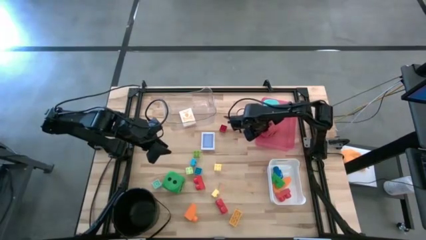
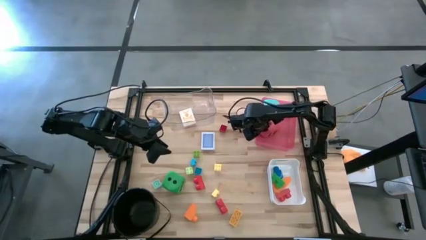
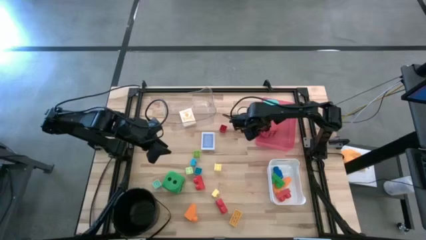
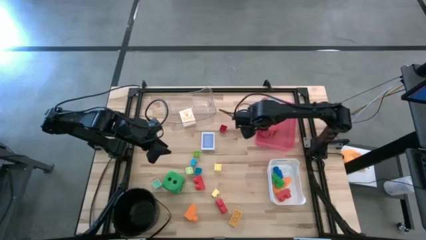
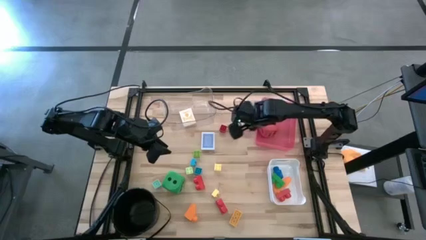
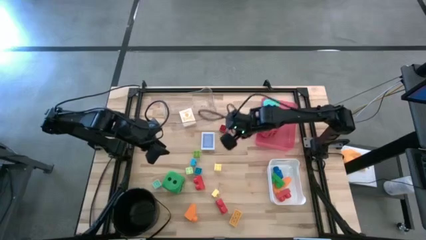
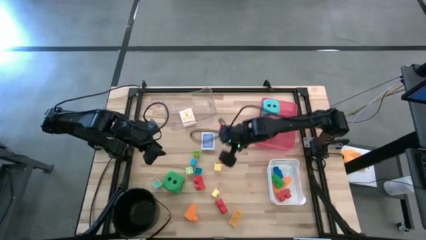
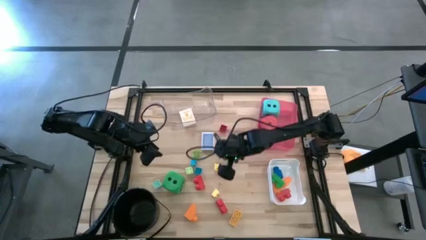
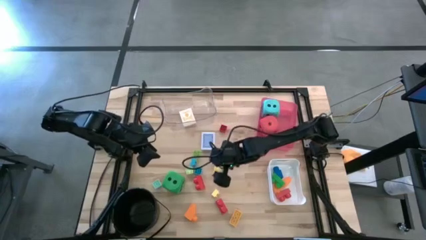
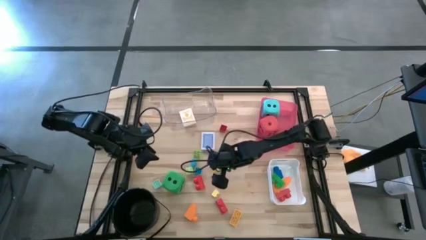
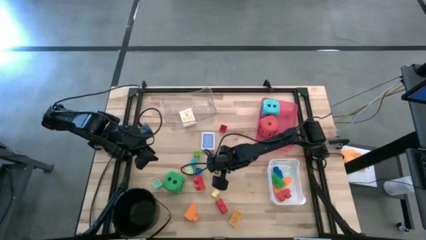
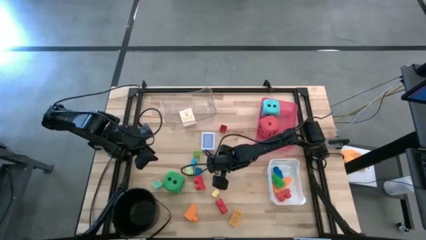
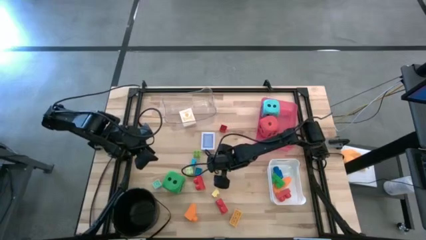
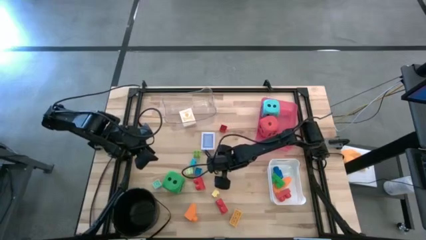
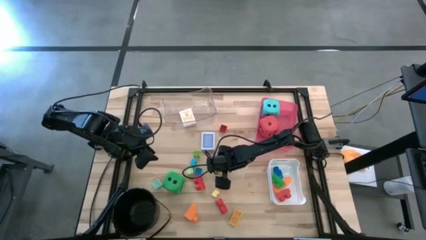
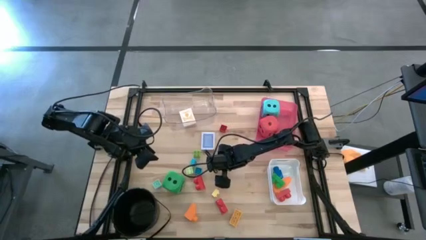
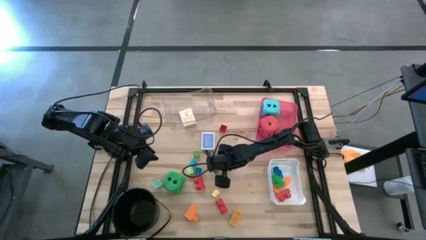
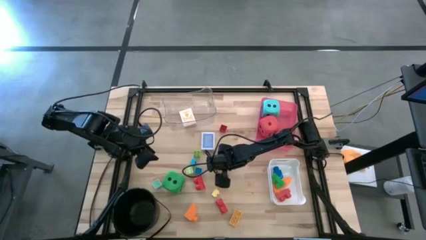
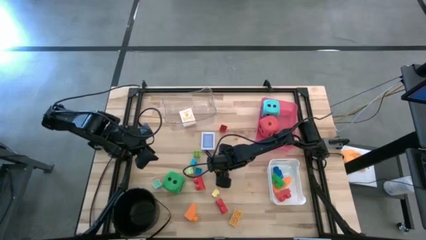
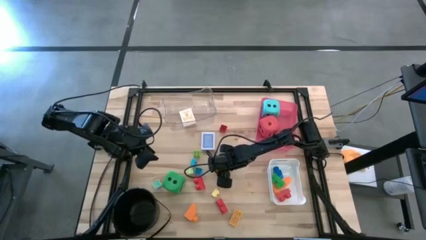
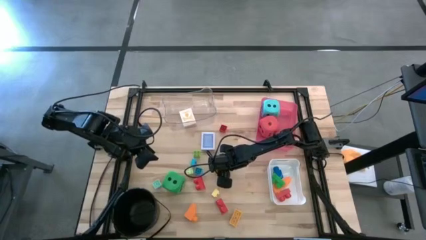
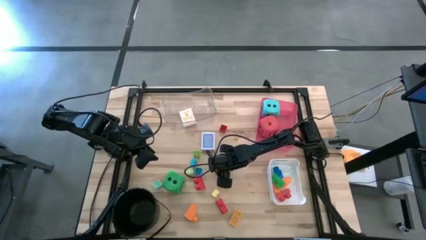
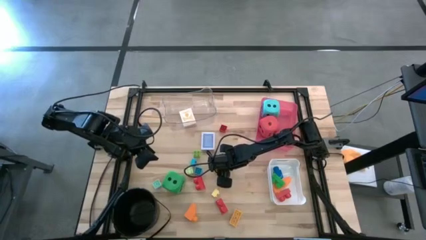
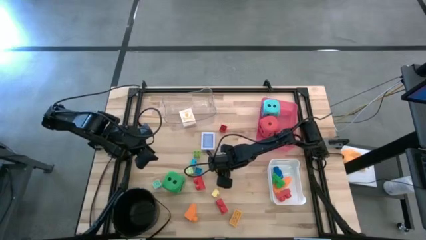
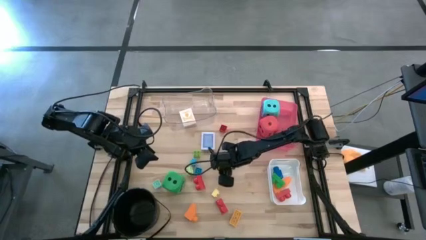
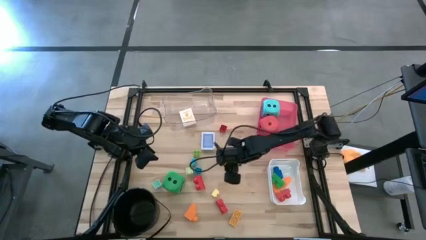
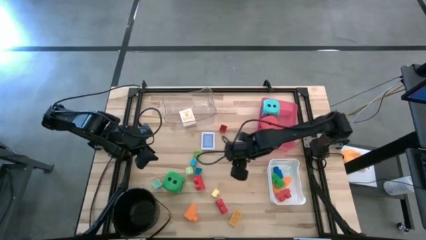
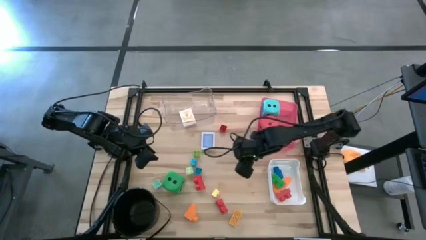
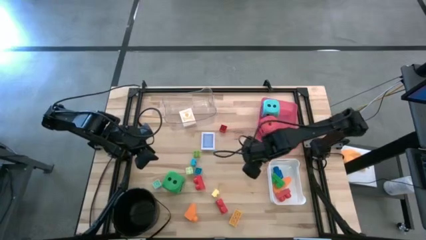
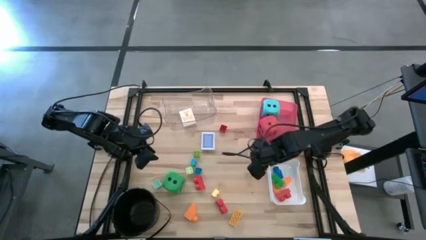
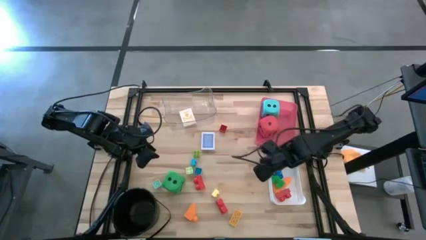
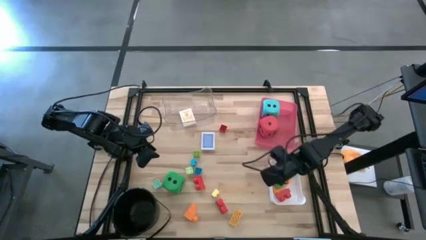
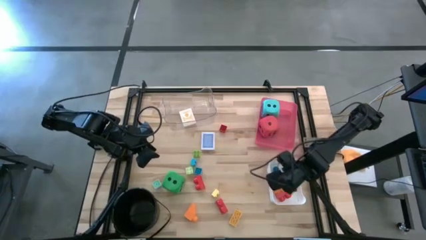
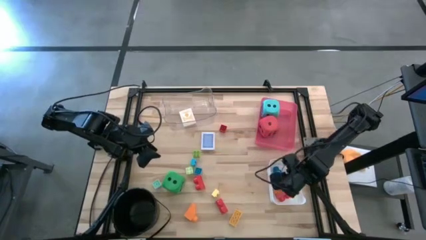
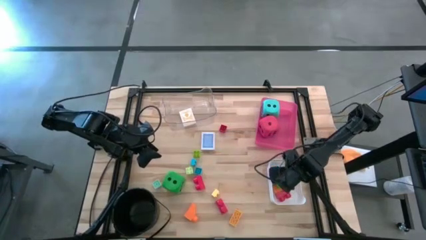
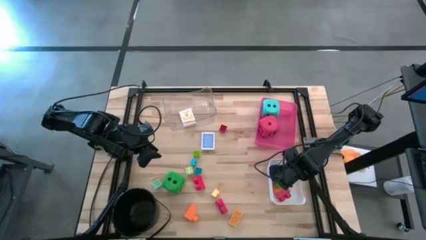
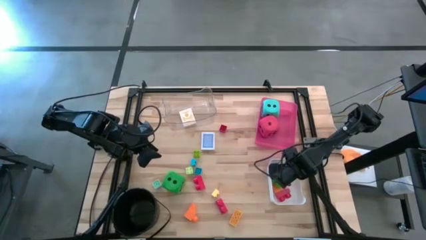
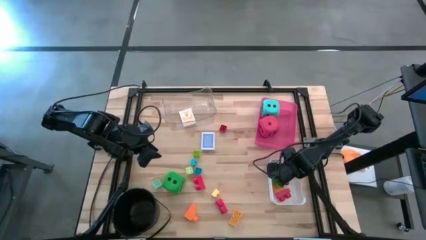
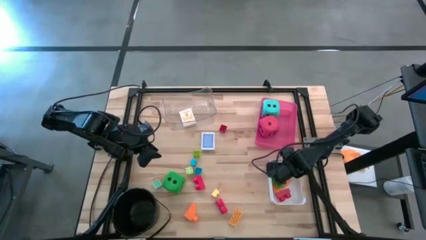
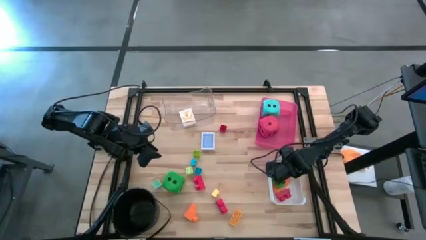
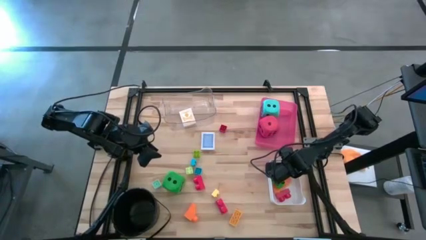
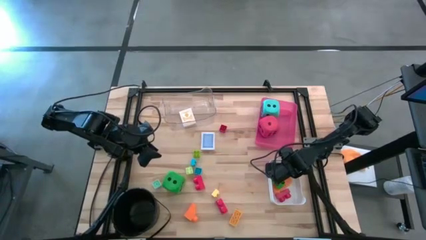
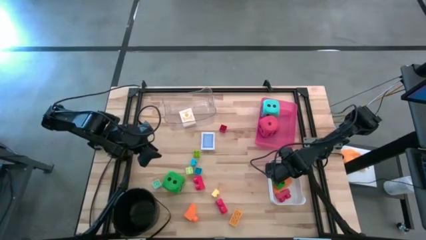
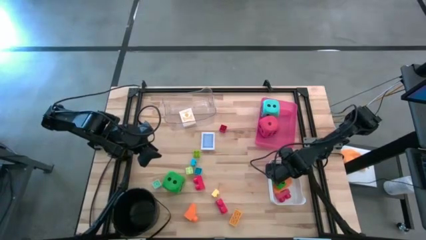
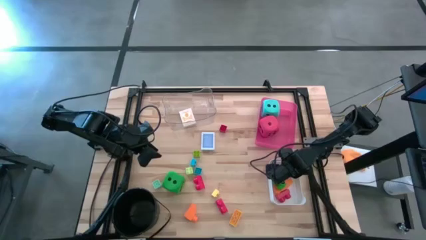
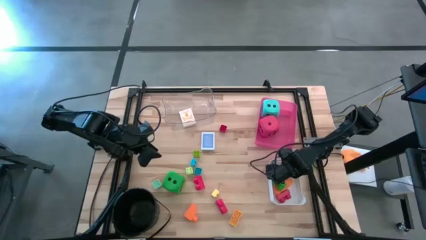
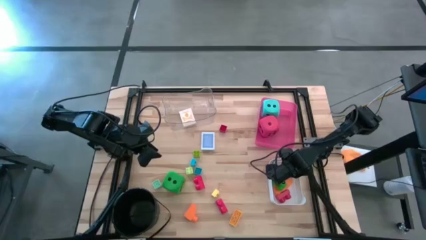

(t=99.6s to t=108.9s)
Task: Pick & Place Toys
Put the yellow game piece into the white bin

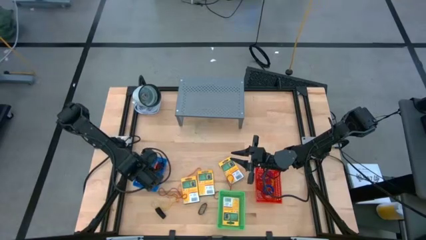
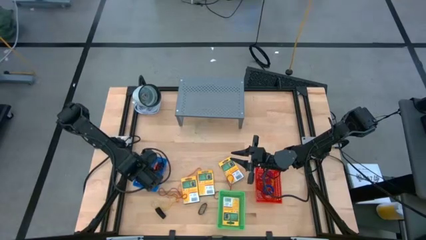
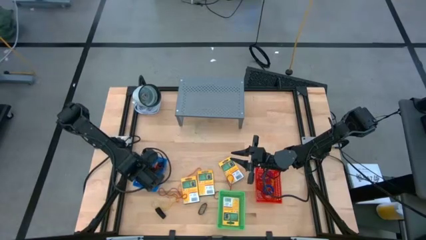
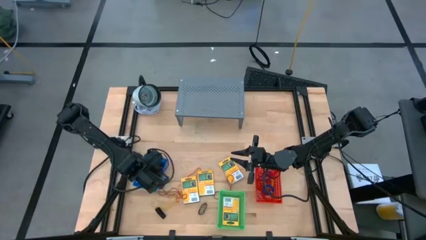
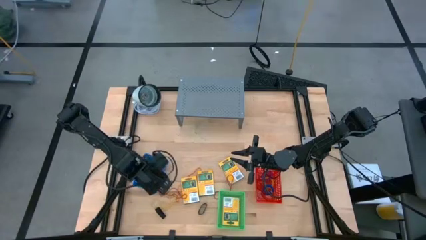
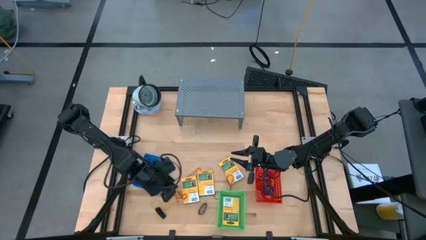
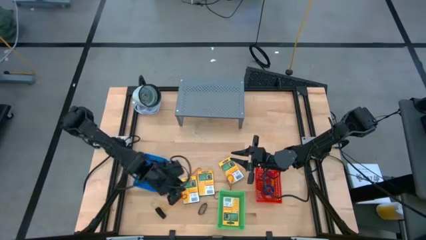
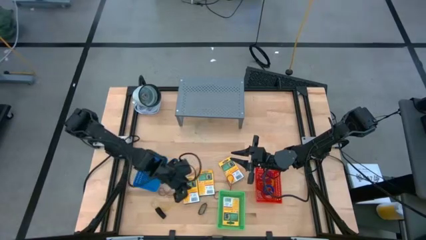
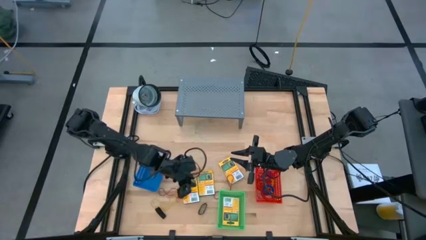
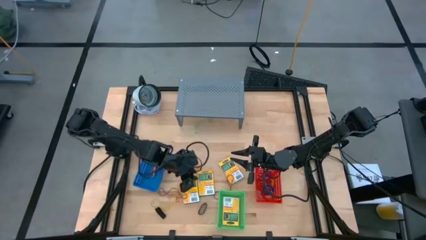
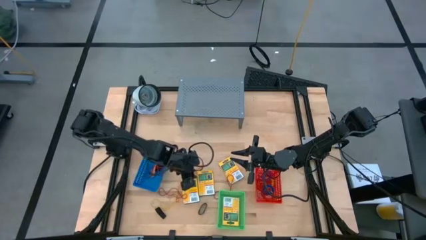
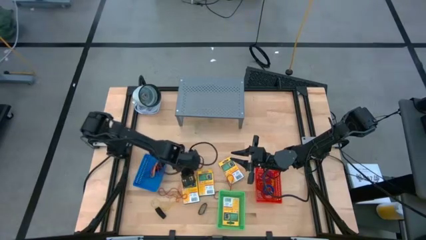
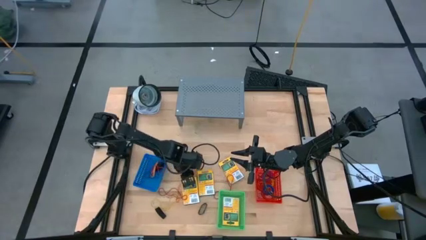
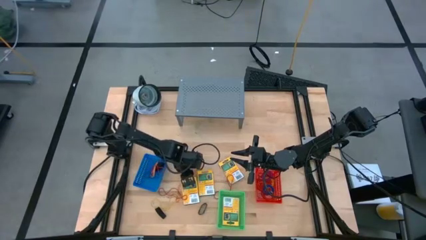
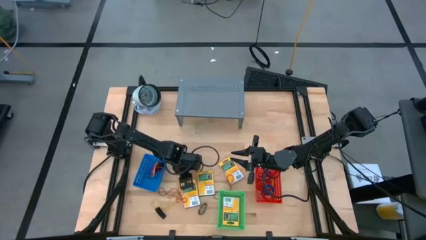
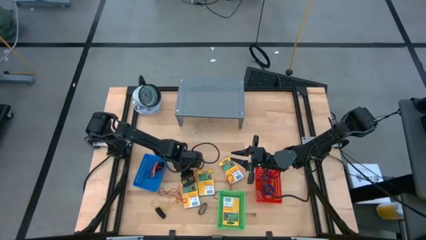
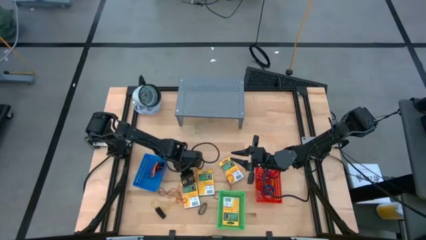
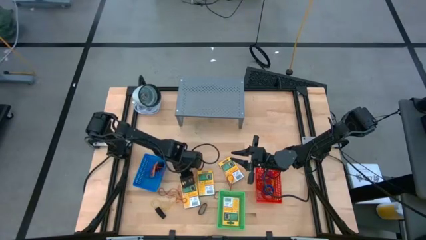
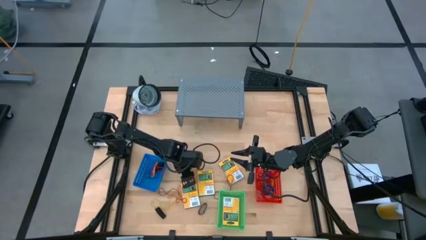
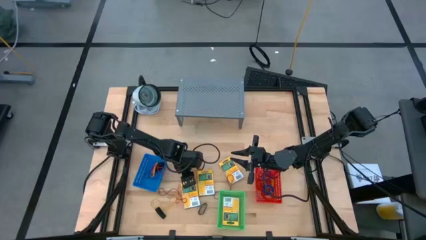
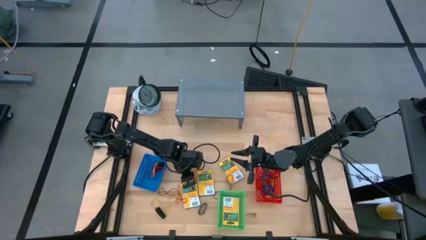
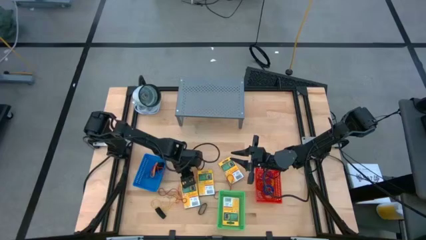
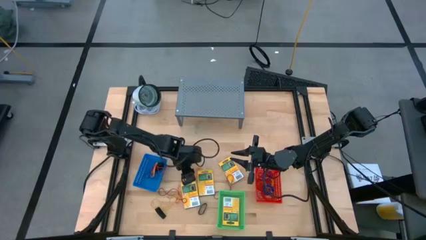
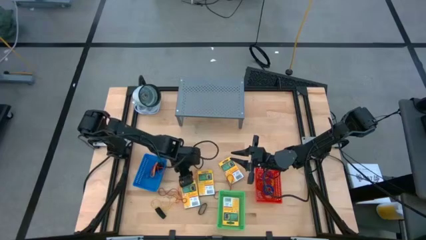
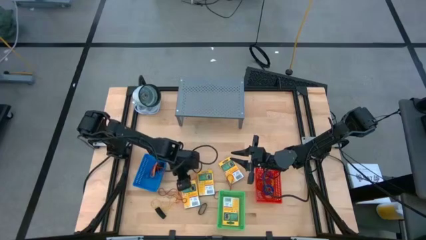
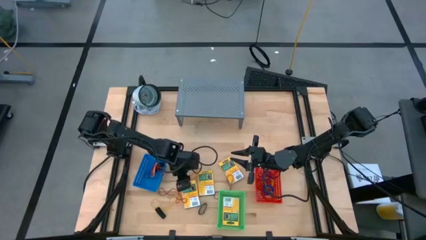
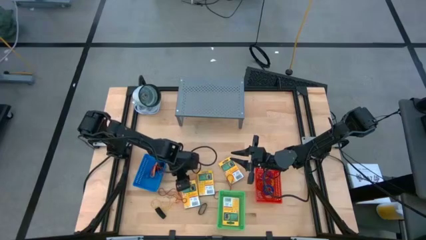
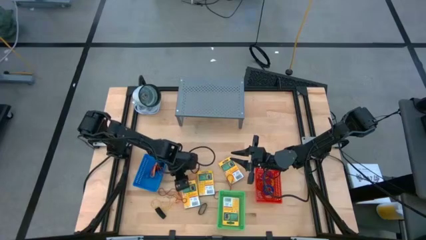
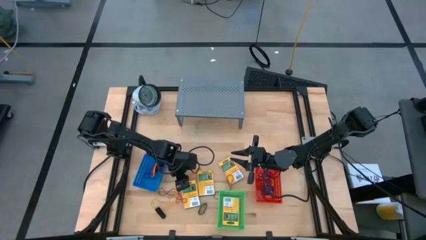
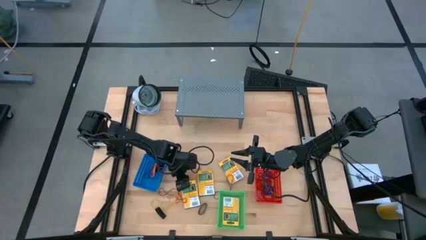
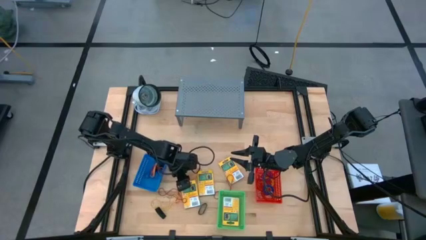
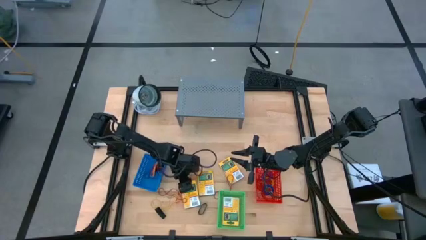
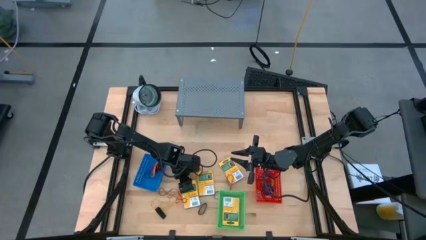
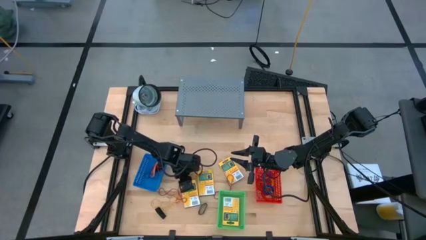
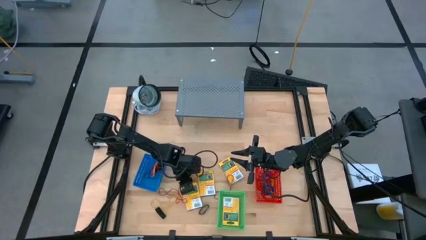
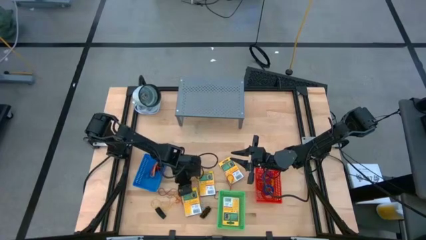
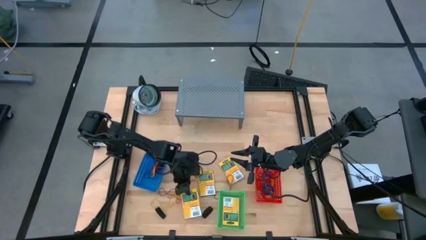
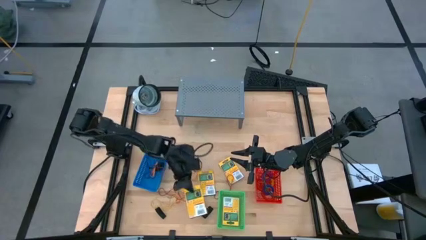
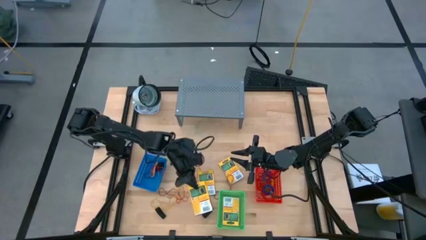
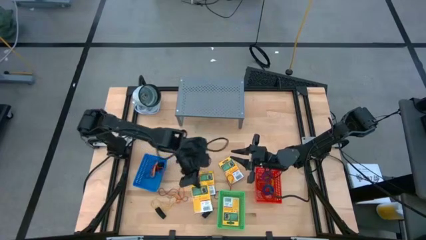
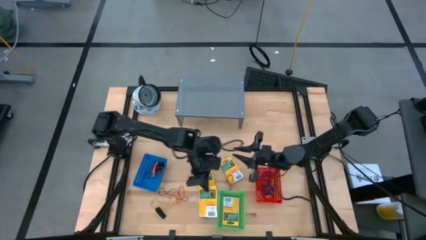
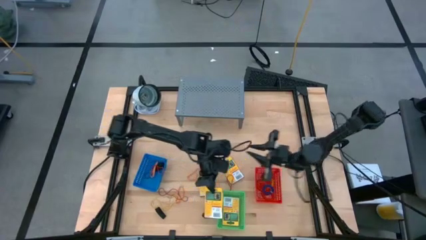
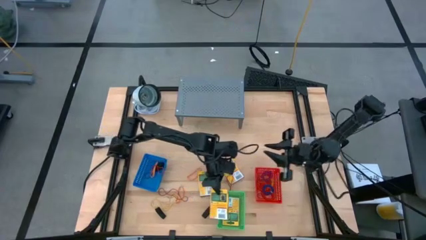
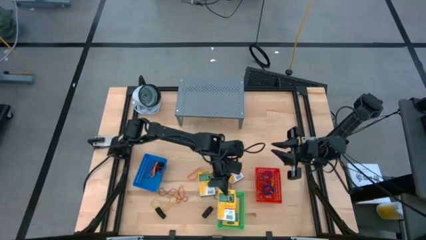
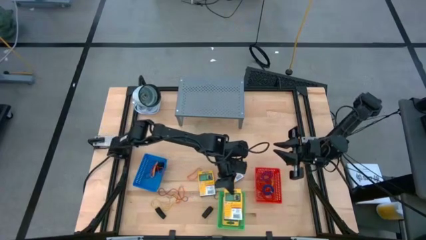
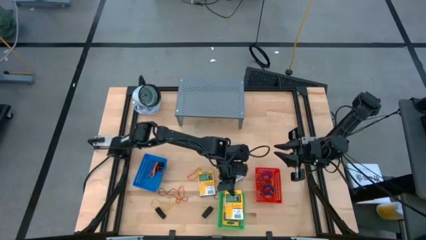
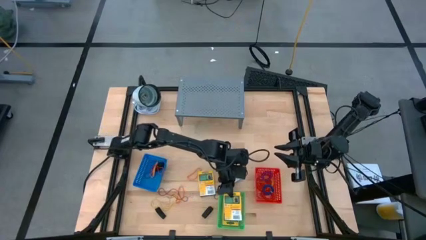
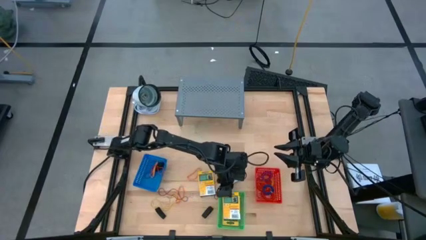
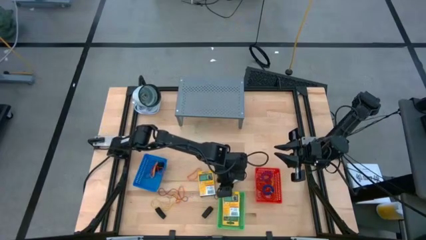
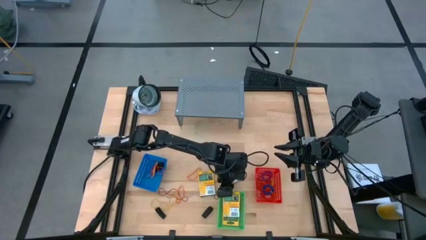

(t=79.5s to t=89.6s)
Task: Pick & Place Office Desk Supplies
Put the yellow crayon box into the green bin
